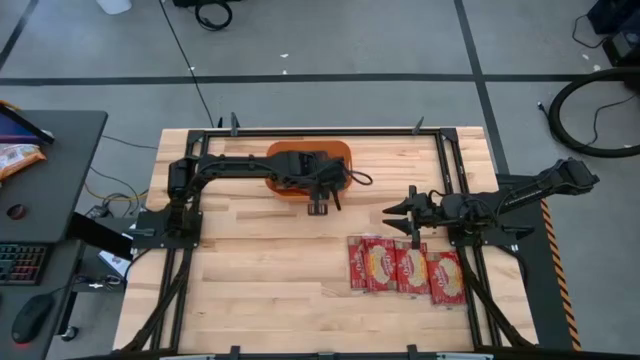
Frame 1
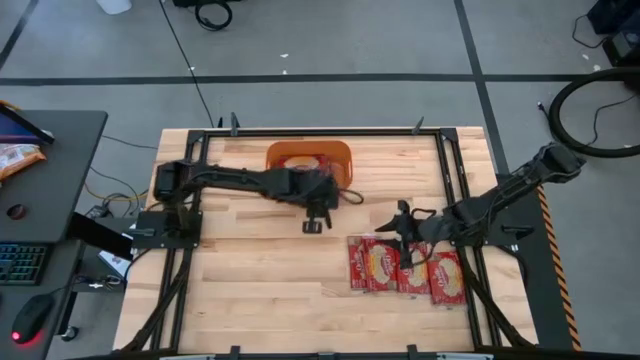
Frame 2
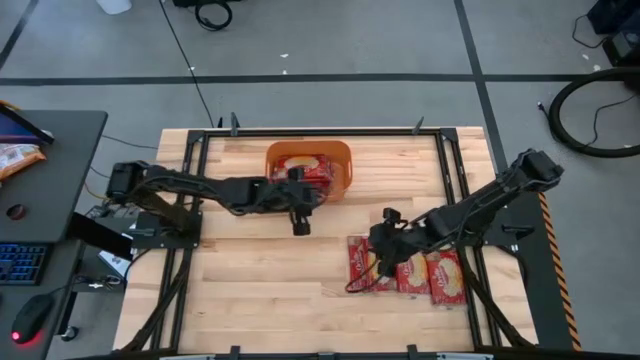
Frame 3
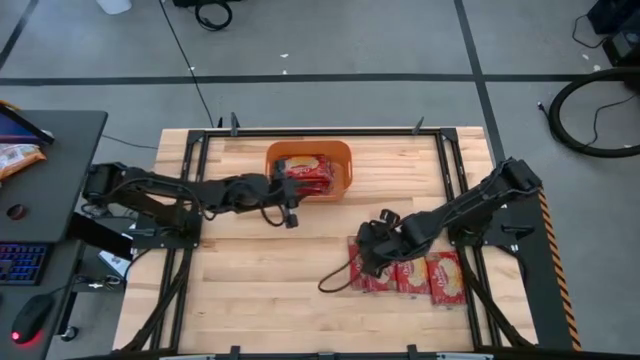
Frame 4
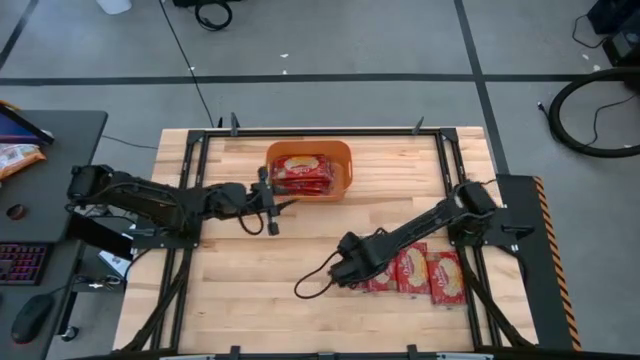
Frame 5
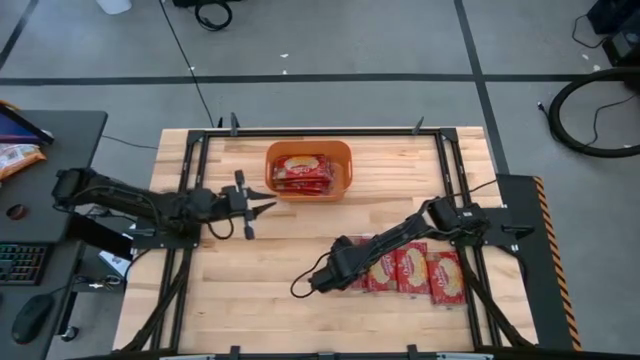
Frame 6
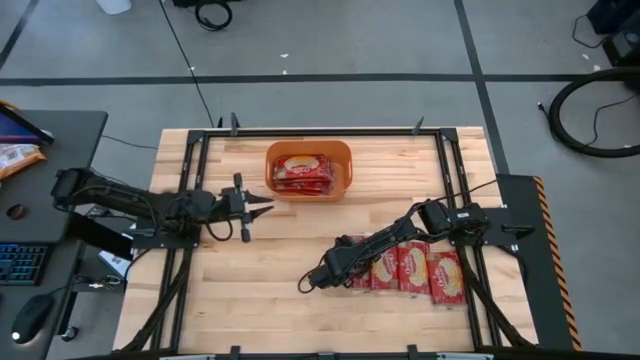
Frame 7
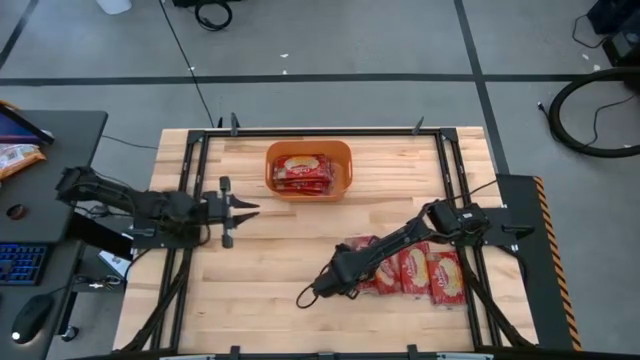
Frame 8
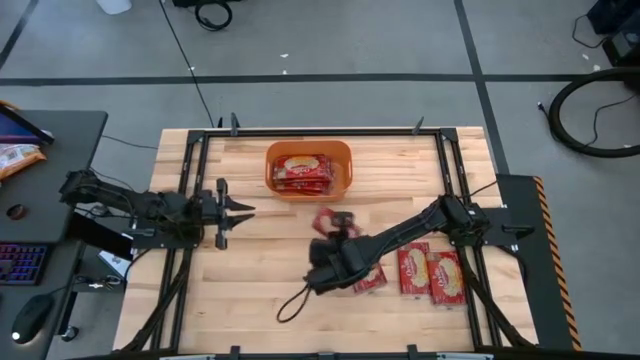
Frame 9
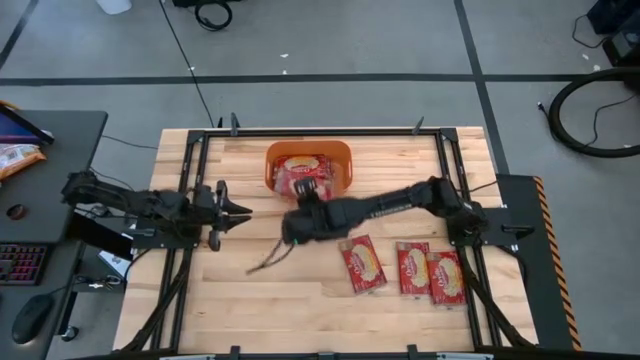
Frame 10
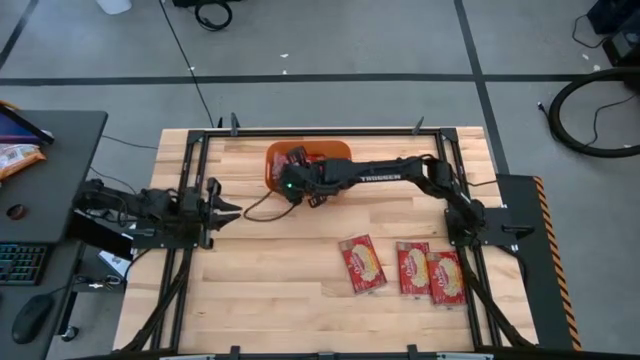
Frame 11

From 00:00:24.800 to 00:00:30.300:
Task: Sort popcorn bags into baskets
Put the red popcorn bag into the orange bin

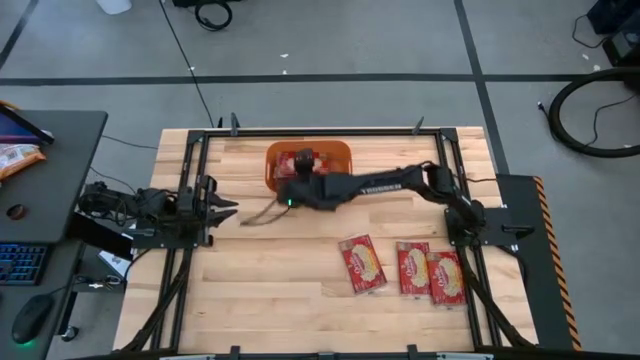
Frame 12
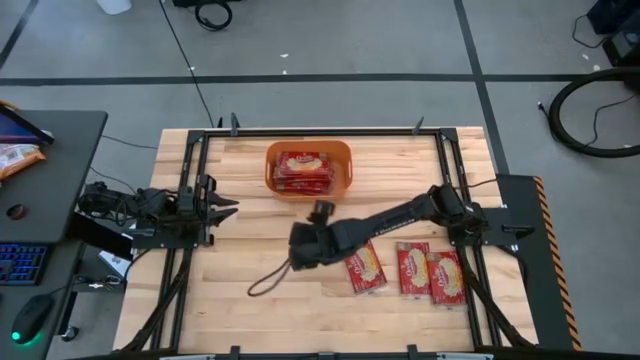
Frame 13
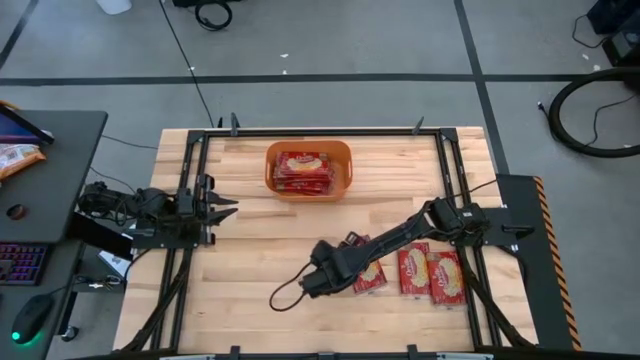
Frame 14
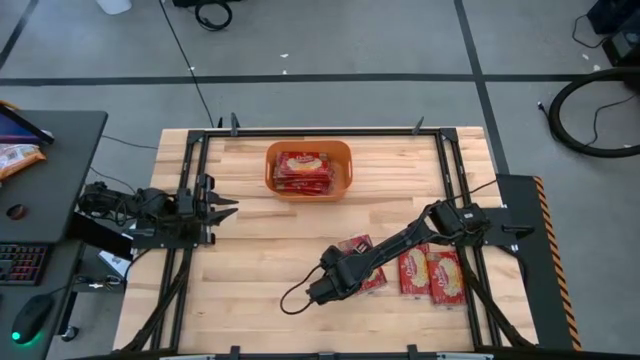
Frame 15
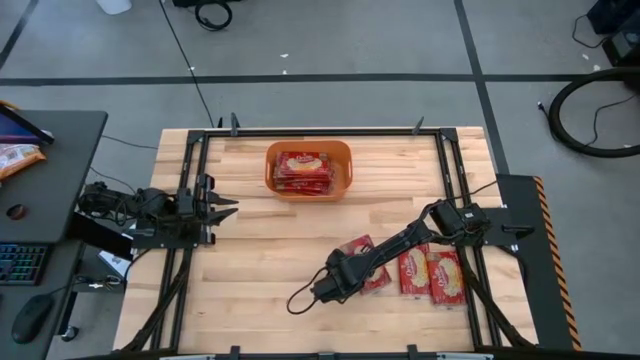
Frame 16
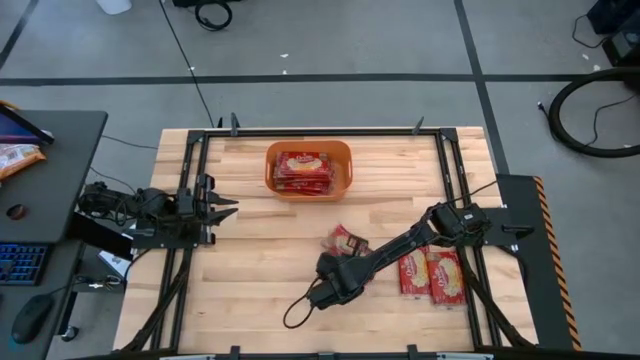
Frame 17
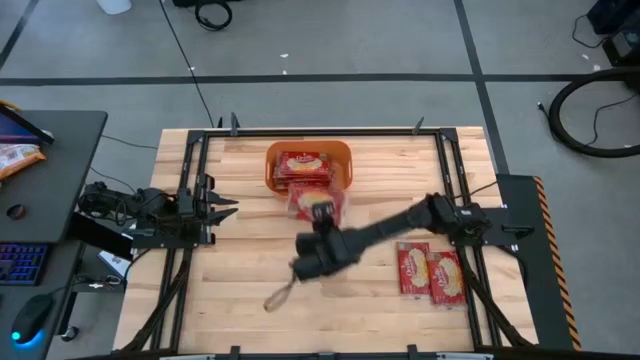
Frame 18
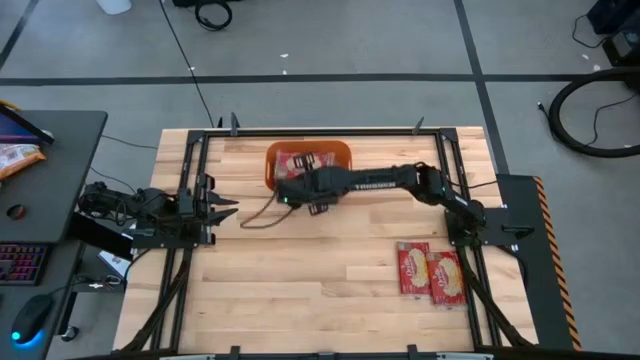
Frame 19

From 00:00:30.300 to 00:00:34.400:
Put the red popcorn bag into the orange bin

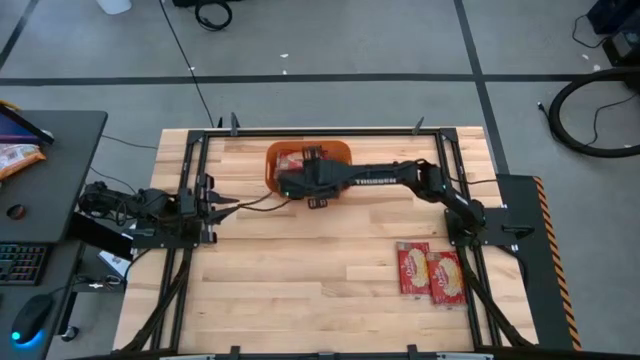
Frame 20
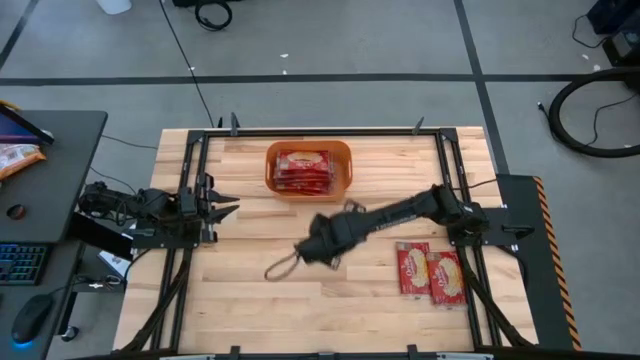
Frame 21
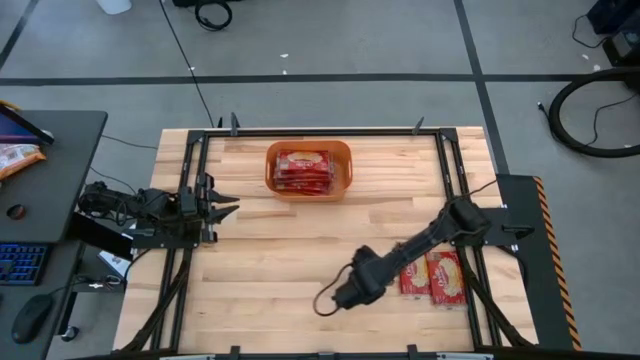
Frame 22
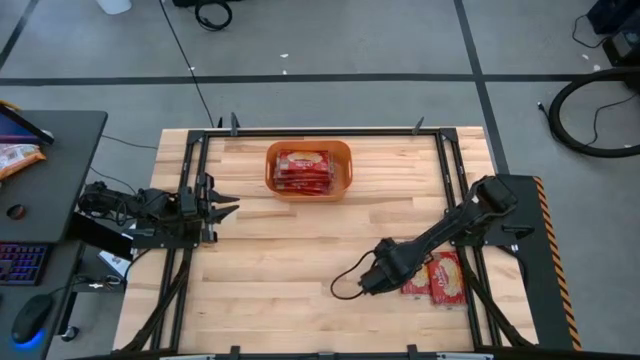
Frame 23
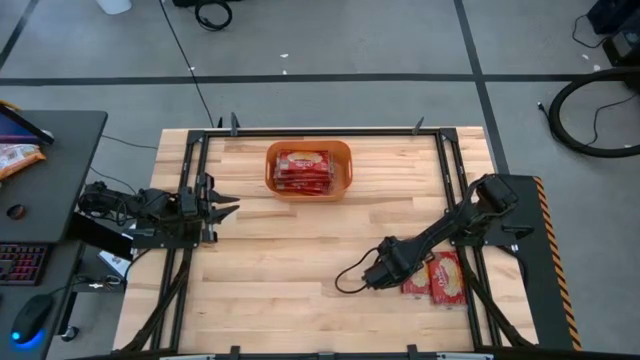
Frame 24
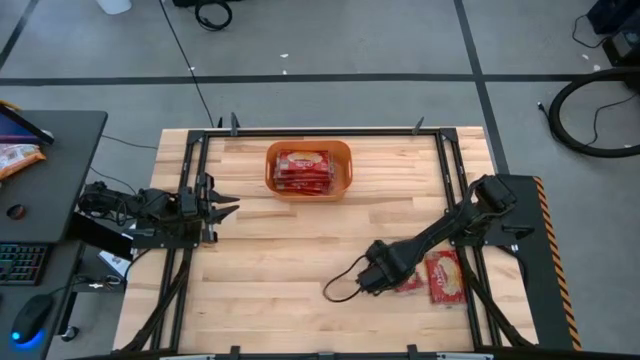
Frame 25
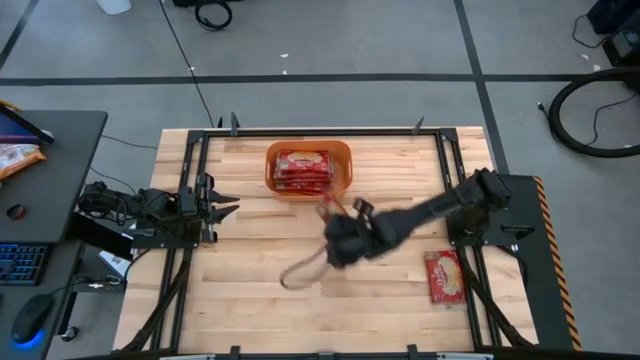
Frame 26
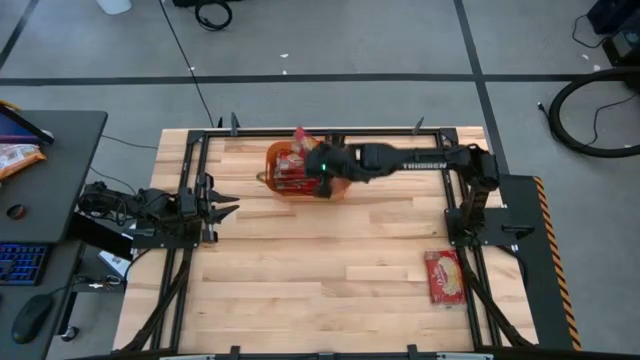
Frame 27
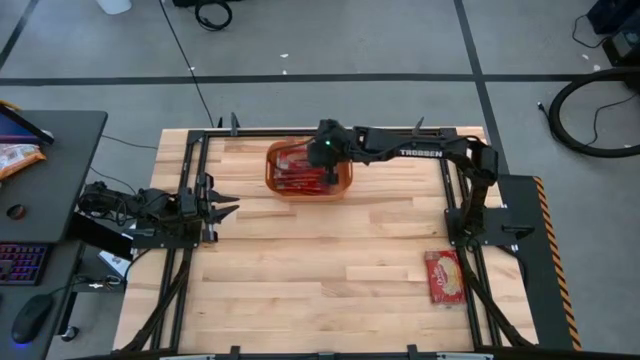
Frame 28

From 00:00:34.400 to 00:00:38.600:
Put the red popcorn bag into the orange bin

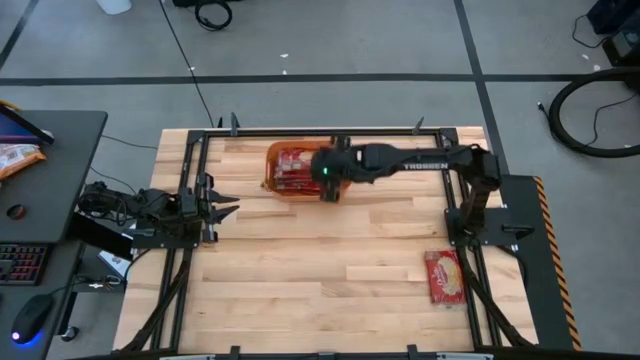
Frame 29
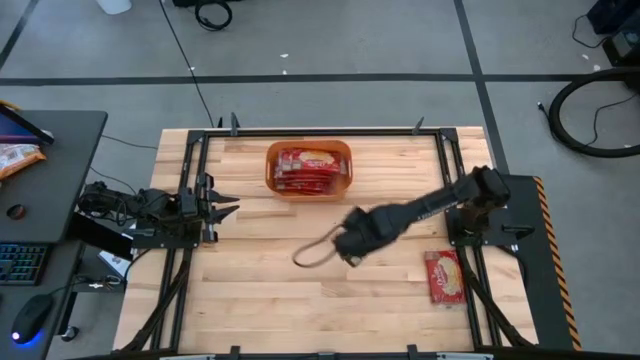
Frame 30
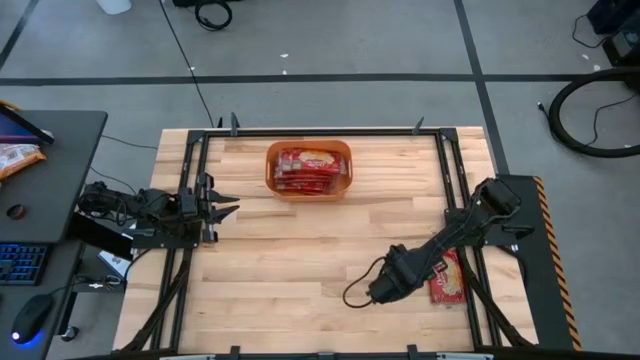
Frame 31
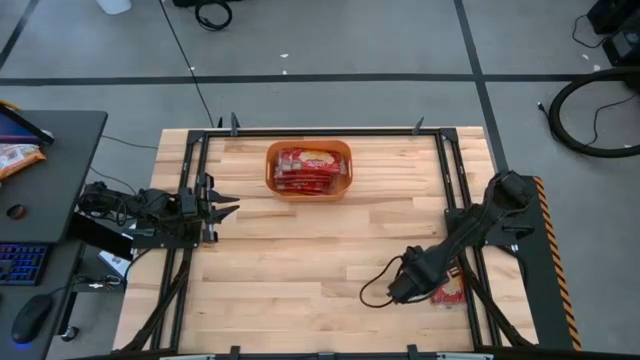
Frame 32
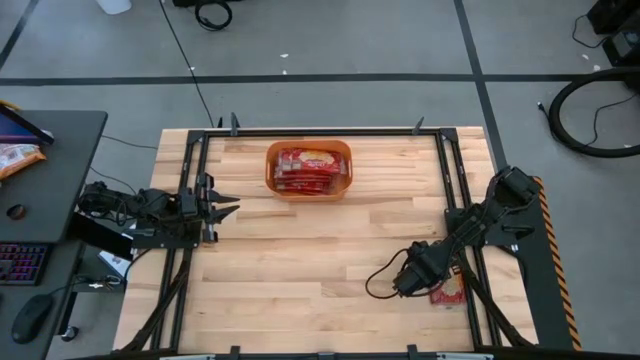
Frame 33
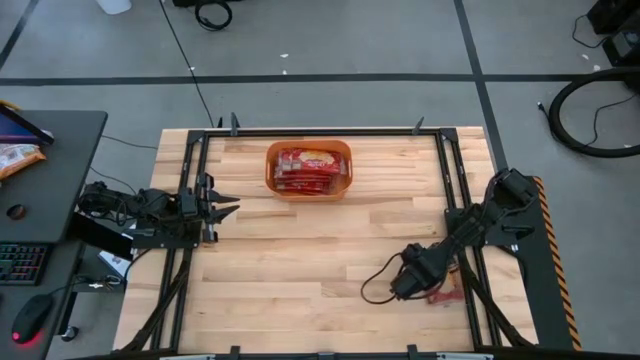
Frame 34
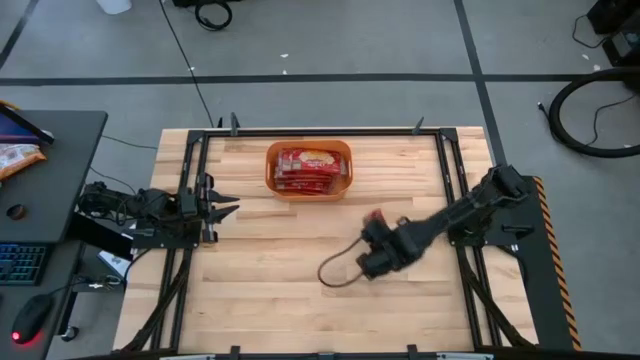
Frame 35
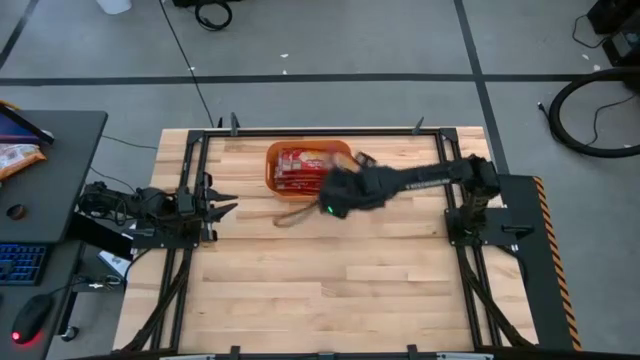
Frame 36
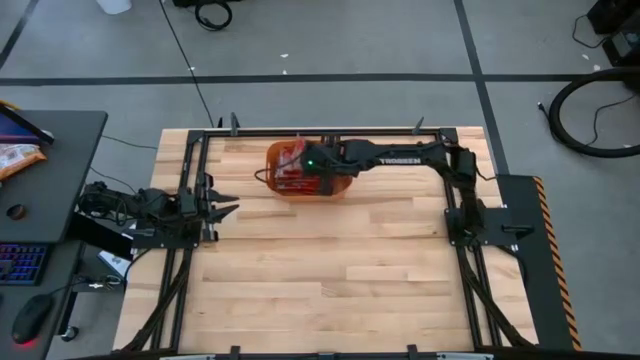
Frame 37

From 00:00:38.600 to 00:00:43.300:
Put the red popcorn bag into the orange bin

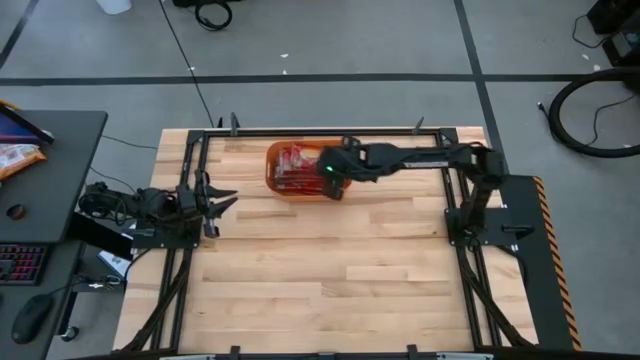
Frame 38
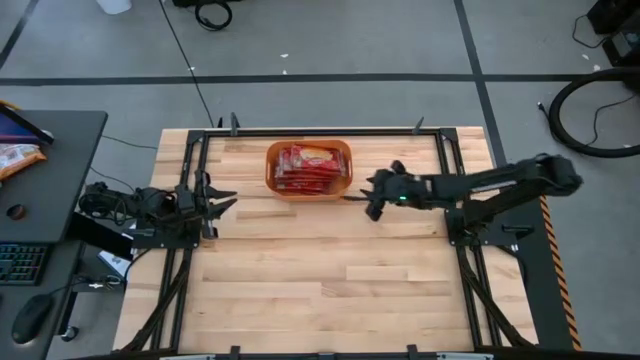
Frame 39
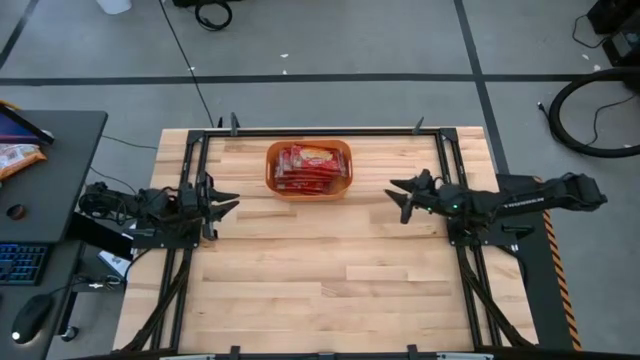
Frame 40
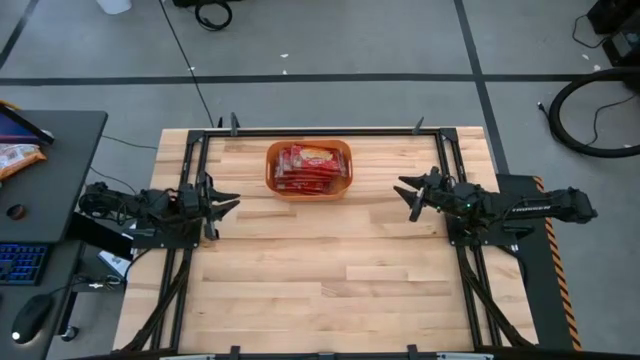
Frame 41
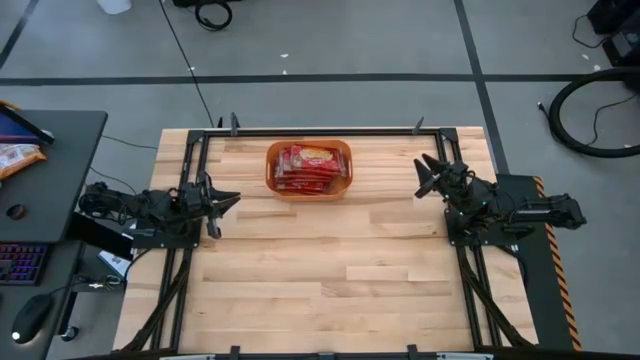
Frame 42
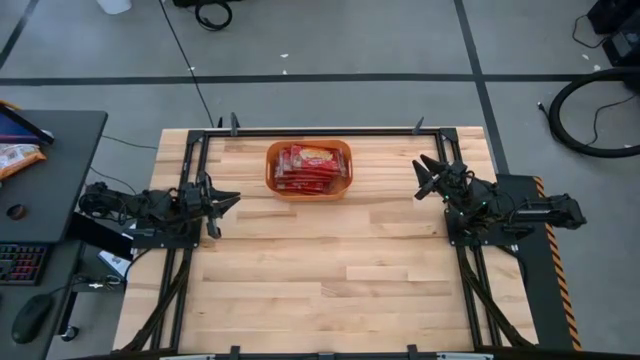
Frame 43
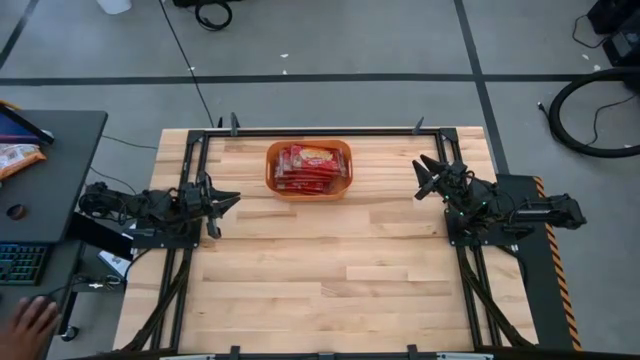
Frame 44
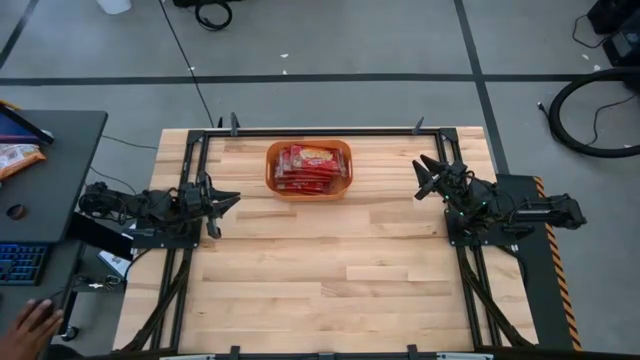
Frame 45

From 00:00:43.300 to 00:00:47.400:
Return to Home Position
